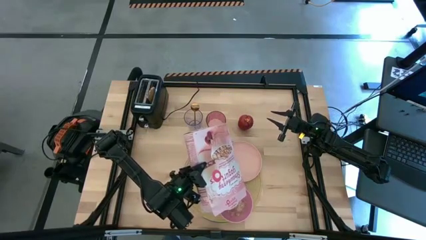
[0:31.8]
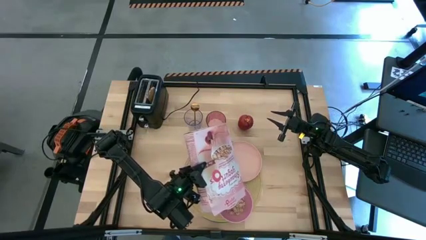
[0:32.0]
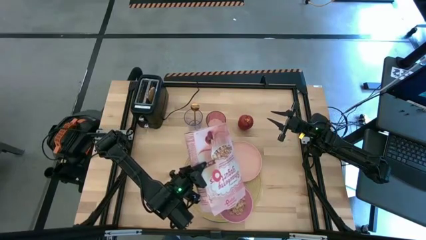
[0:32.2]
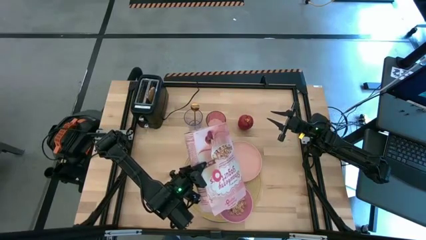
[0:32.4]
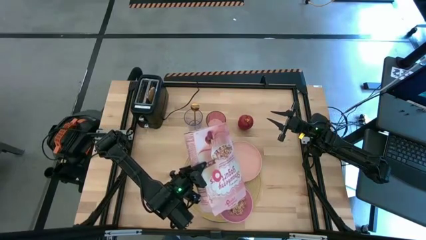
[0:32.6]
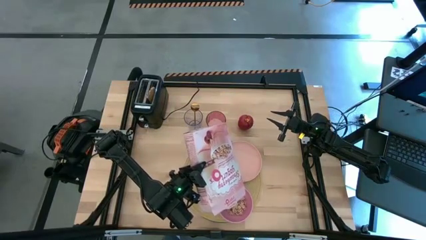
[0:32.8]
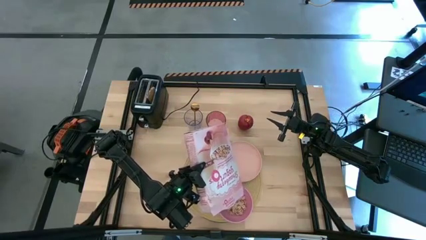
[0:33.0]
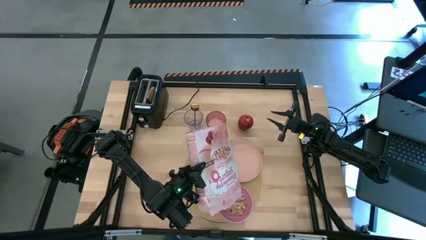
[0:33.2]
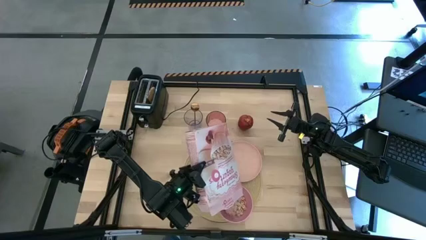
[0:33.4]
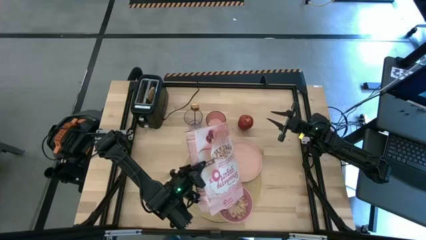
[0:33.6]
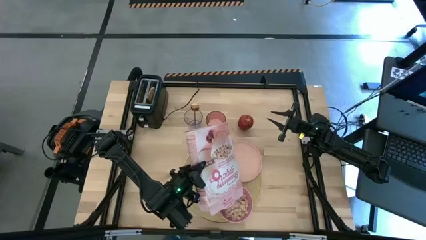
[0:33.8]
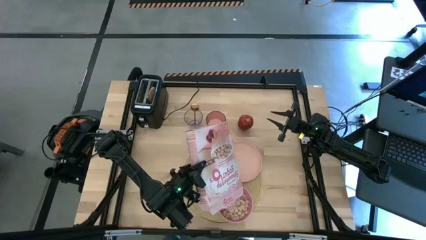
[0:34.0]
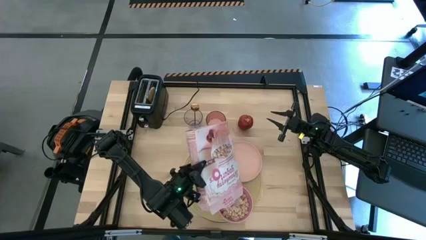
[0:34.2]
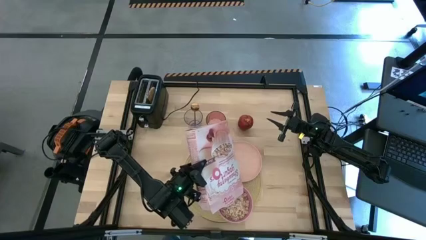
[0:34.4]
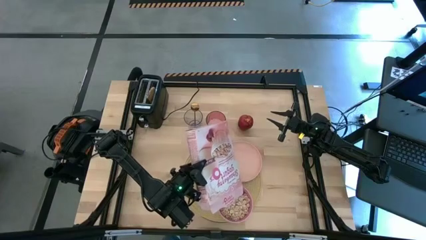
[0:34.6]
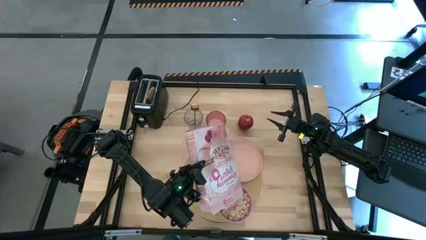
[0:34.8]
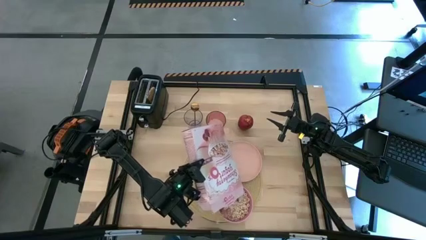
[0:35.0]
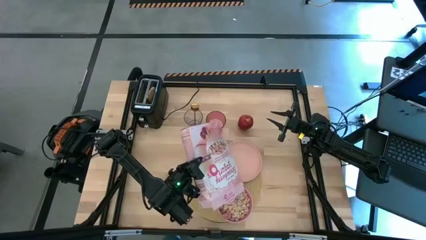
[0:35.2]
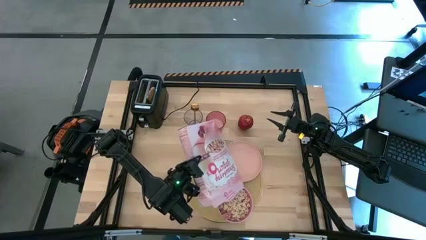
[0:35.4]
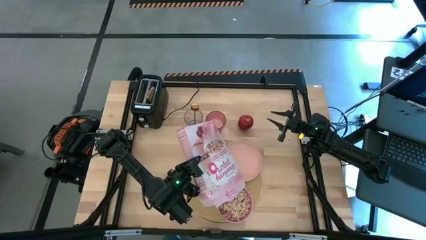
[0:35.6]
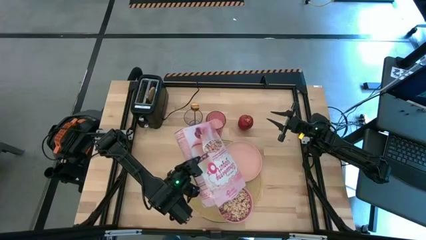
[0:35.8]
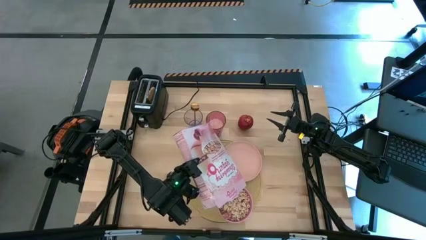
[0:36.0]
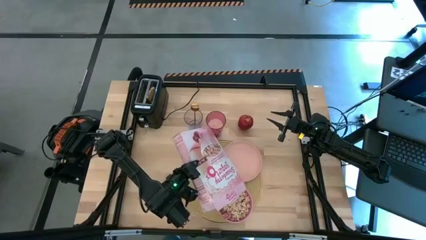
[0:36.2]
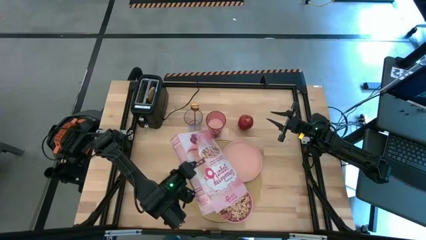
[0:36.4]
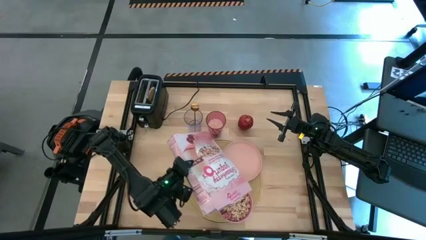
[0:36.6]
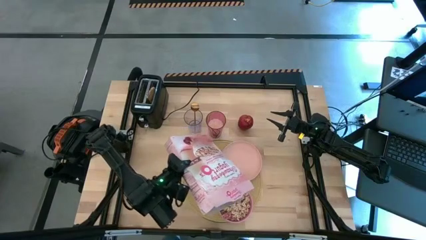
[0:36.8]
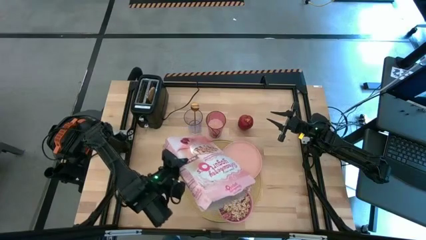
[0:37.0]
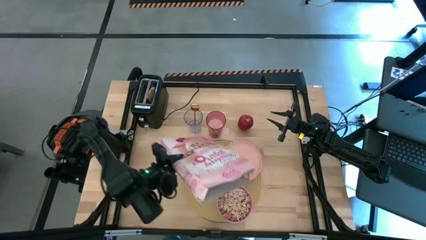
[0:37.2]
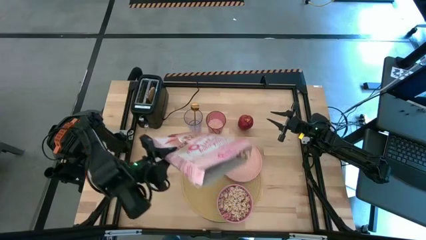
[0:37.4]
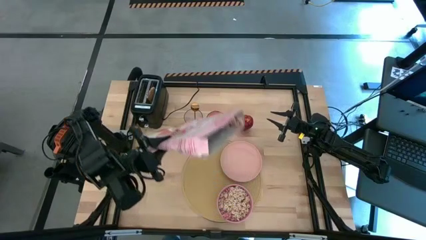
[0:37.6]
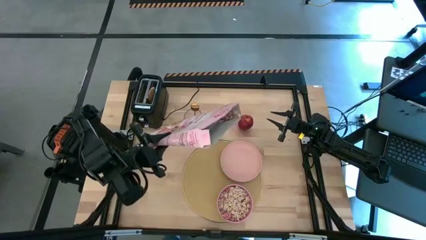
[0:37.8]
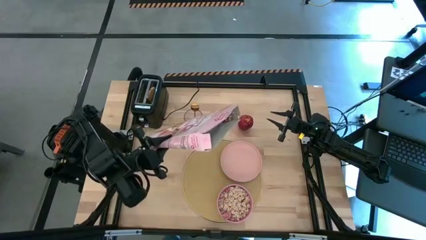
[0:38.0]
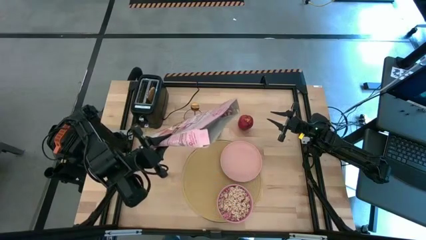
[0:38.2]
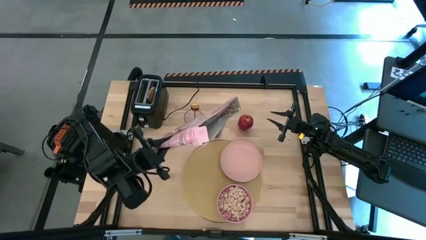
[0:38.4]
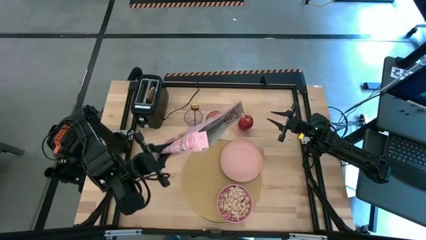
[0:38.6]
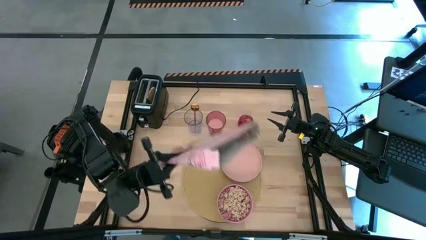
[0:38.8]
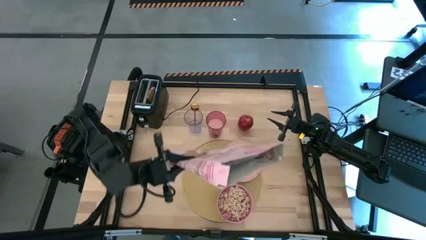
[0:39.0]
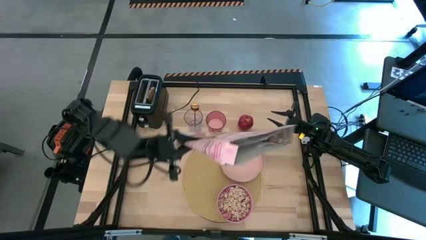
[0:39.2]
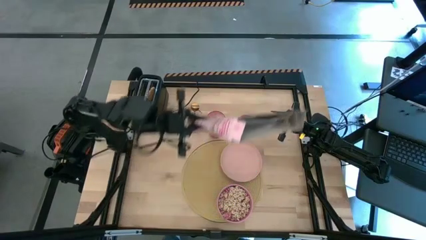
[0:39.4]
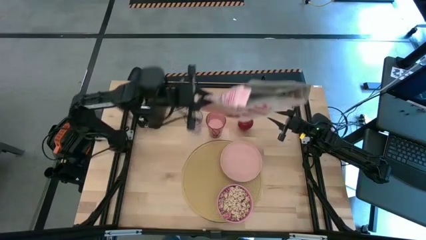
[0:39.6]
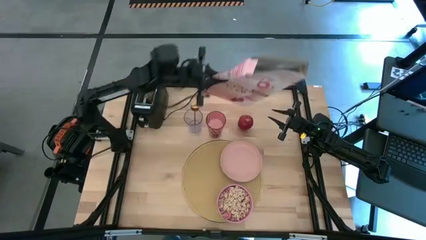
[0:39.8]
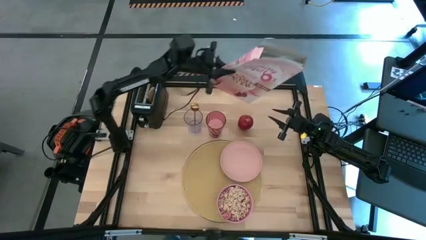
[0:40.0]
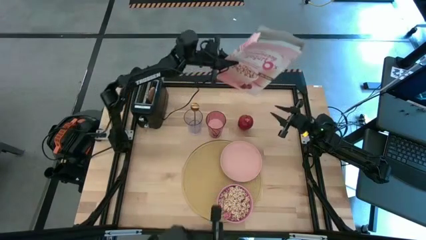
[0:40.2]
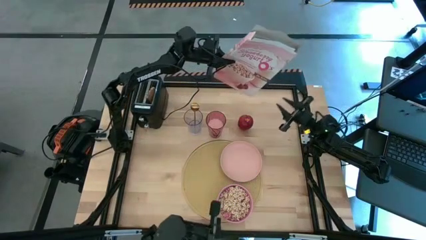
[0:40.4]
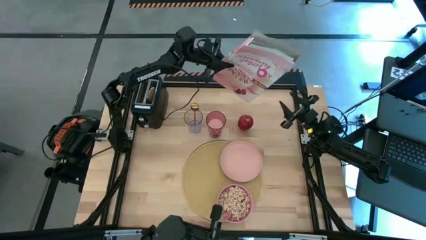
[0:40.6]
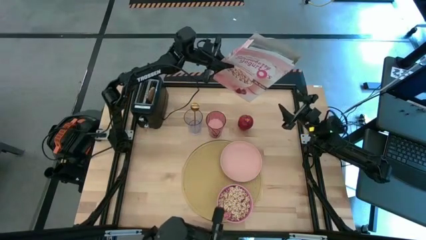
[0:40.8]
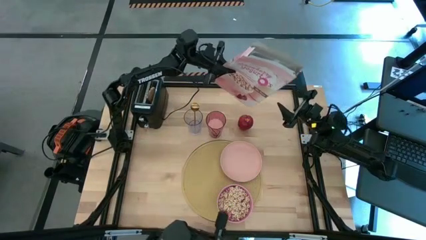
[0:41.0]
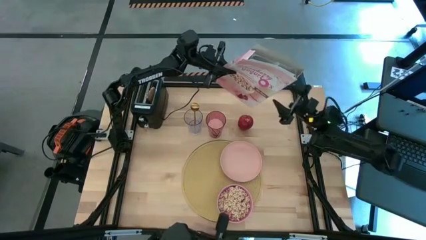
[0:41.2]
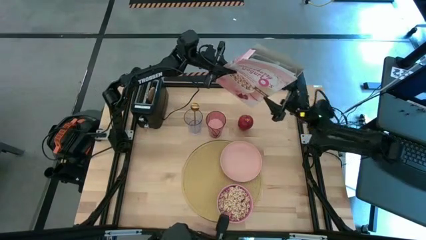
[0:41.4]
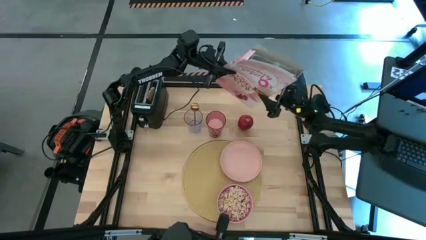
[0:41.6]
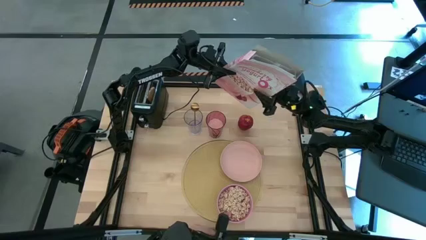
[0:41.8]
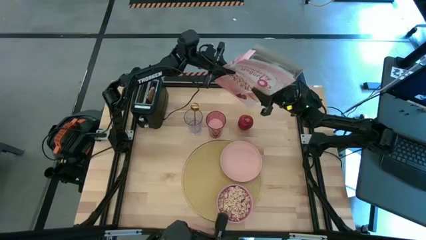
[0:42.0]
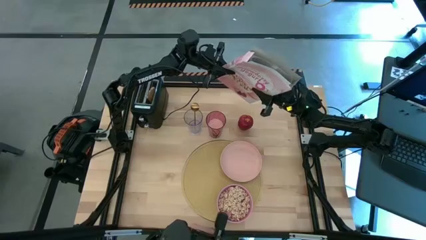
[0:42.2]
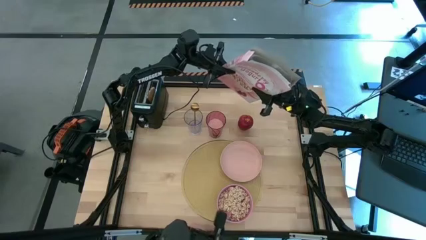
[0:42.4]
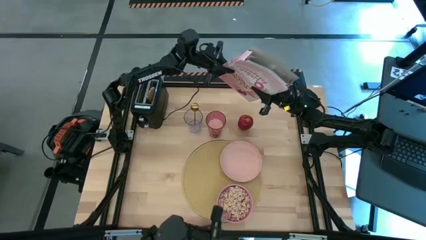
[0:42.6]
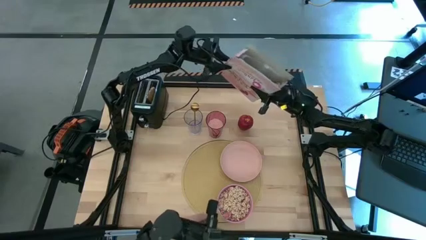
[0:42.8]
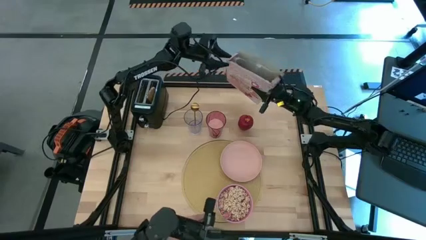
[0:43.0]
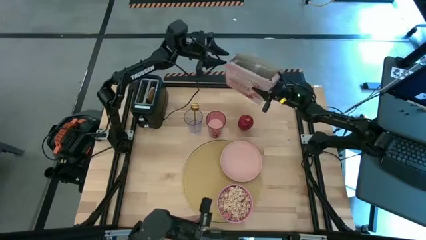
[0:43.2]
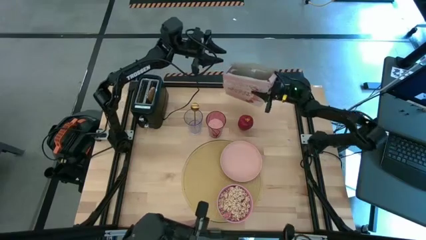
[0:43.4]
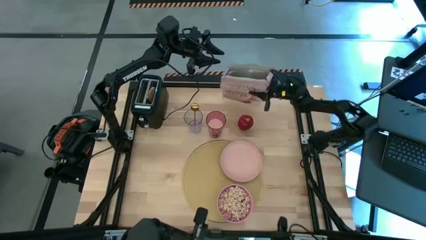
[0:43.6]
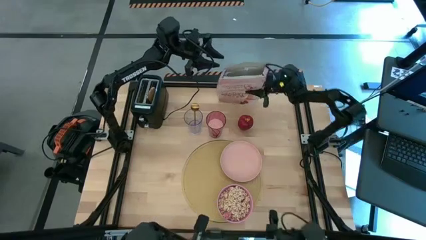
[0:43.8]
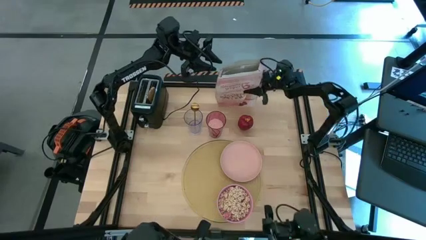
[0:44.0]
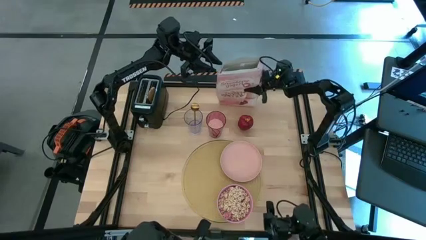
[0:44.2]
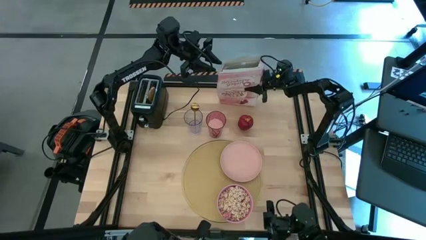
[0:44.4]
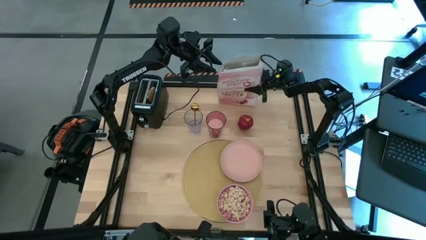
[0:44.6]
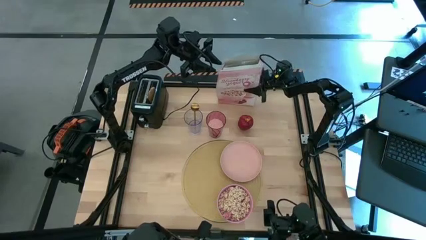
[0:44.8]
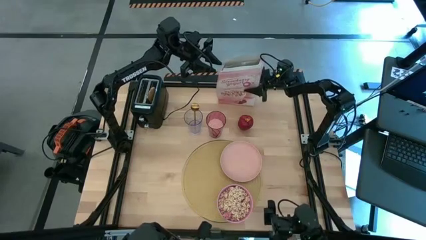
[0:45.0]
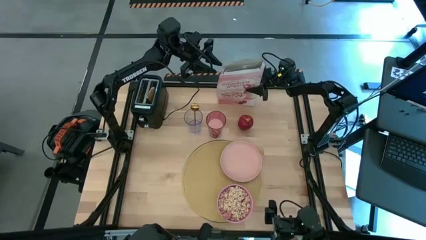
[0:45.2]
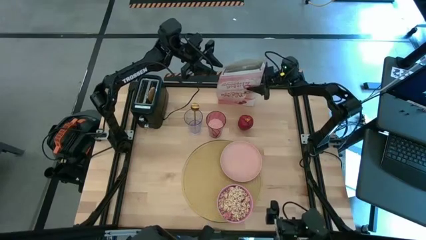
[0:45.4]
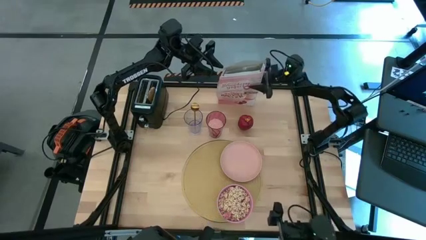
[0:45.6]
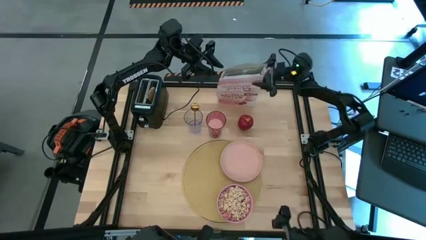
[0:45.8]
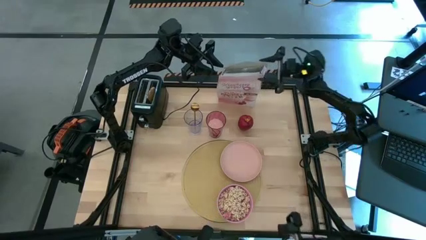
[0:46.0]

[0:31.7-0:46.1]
Task: Arrange a breakfast setting
Pour the cereal from the pink cereal box into the pink bowl
